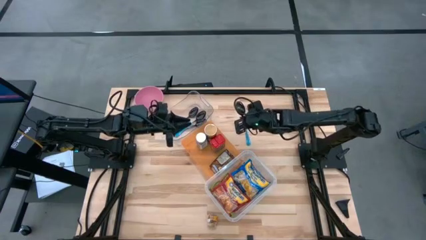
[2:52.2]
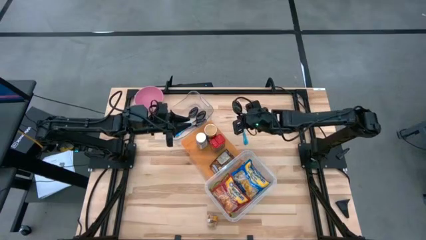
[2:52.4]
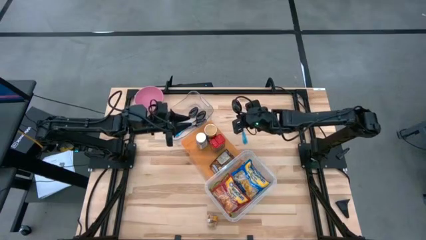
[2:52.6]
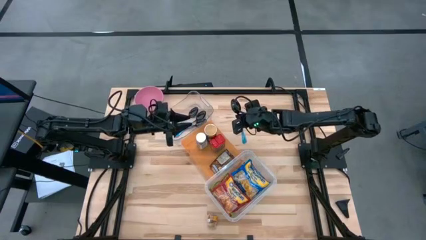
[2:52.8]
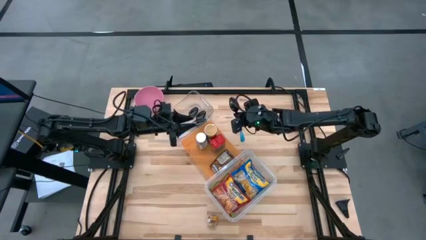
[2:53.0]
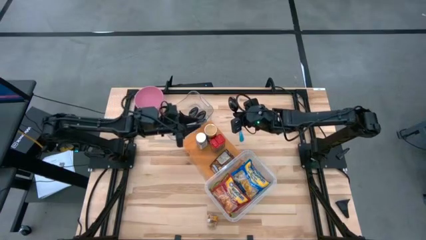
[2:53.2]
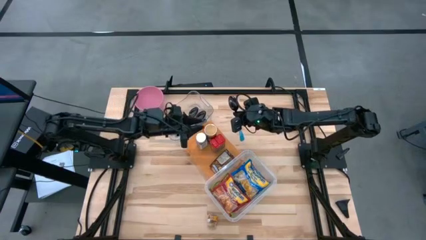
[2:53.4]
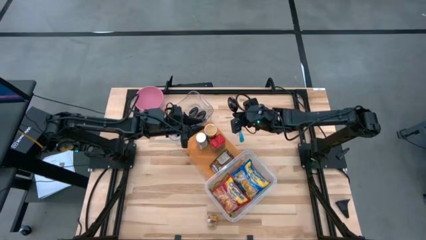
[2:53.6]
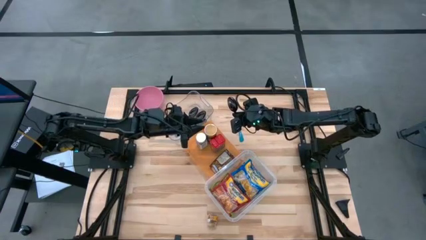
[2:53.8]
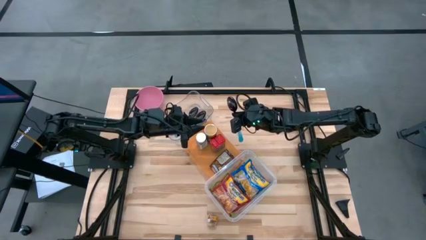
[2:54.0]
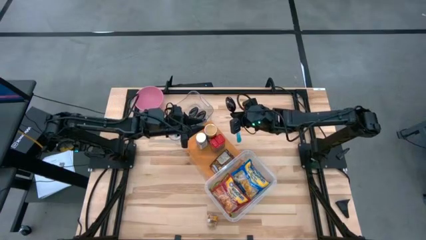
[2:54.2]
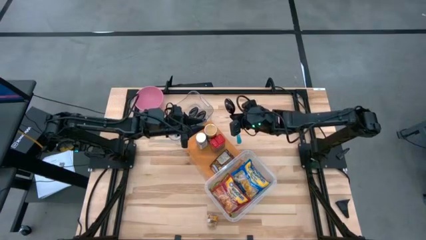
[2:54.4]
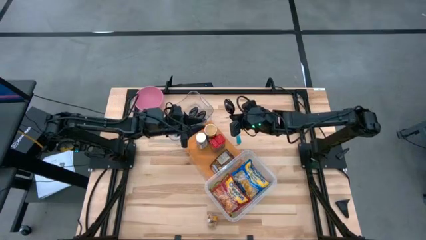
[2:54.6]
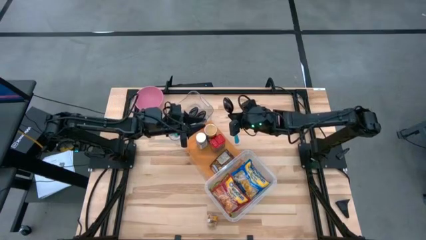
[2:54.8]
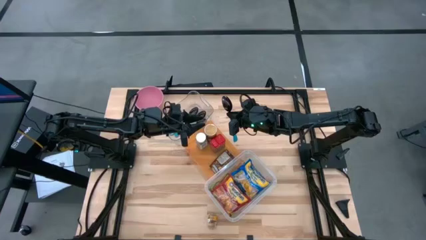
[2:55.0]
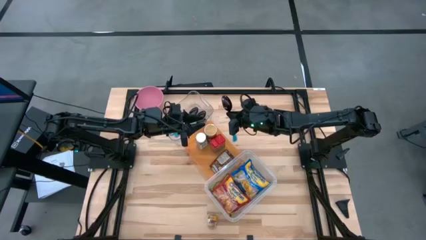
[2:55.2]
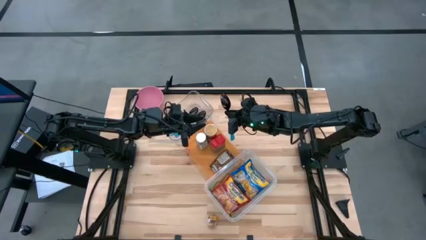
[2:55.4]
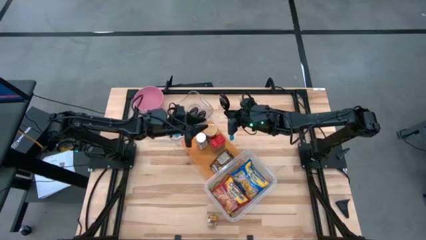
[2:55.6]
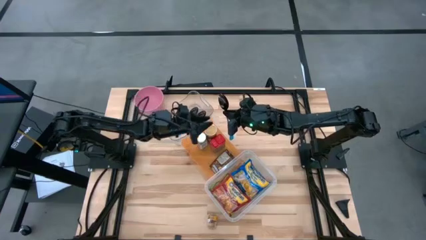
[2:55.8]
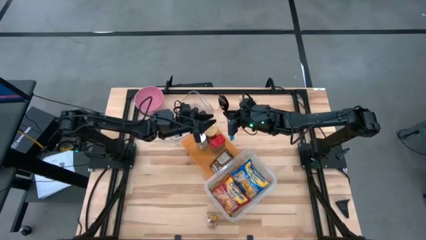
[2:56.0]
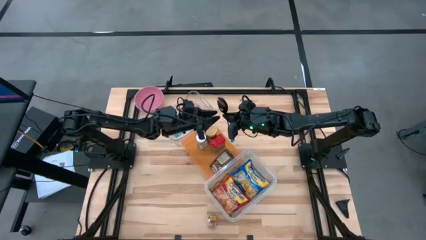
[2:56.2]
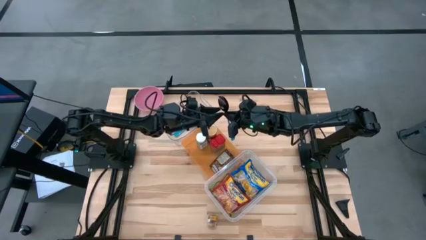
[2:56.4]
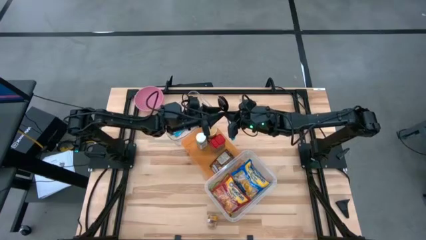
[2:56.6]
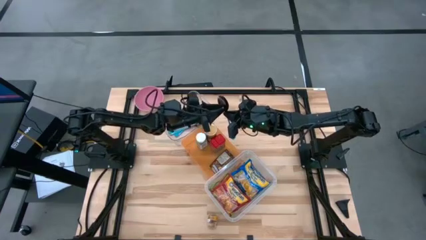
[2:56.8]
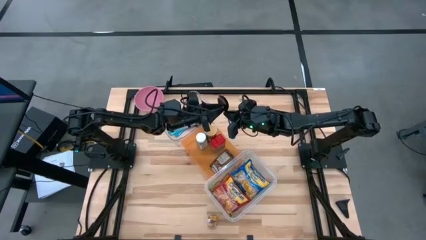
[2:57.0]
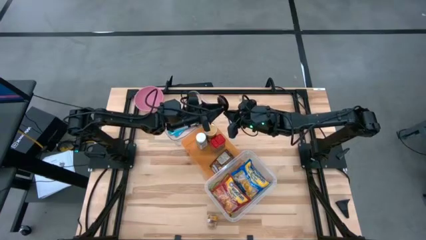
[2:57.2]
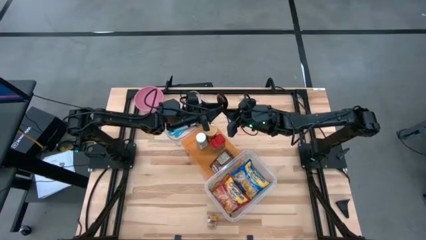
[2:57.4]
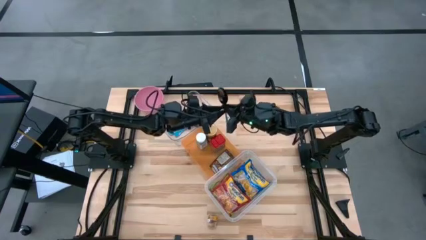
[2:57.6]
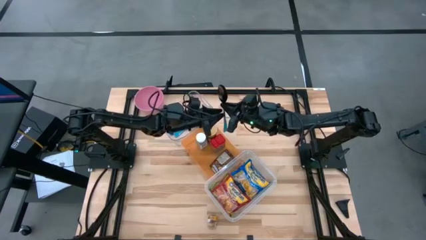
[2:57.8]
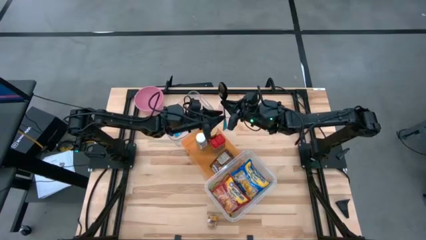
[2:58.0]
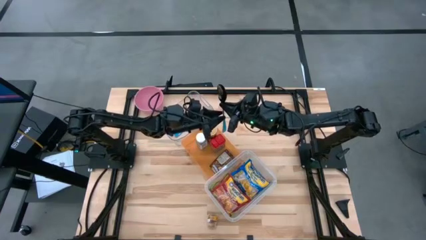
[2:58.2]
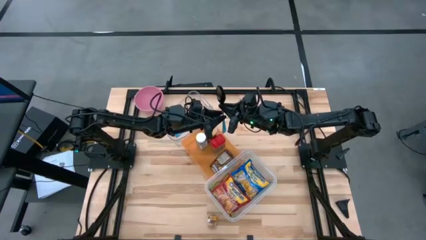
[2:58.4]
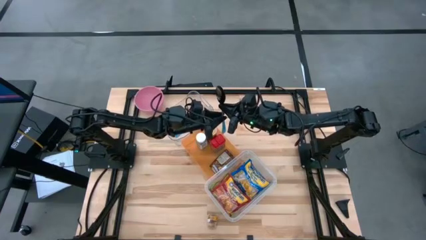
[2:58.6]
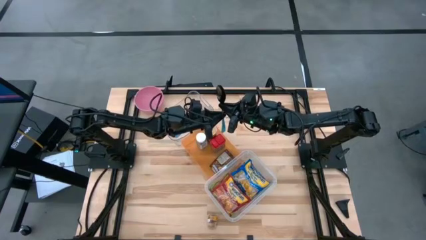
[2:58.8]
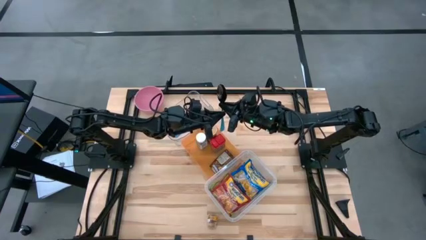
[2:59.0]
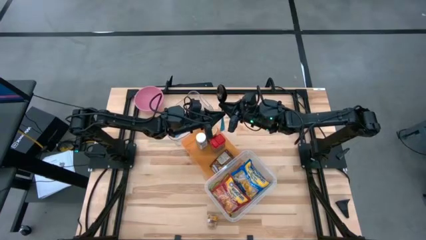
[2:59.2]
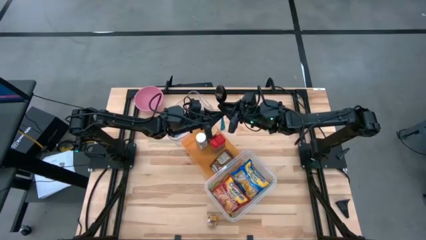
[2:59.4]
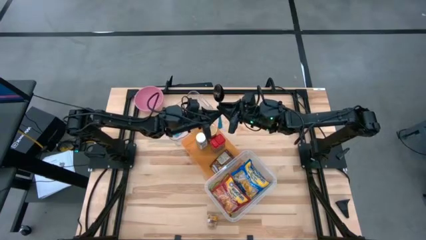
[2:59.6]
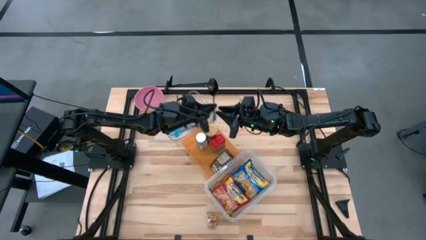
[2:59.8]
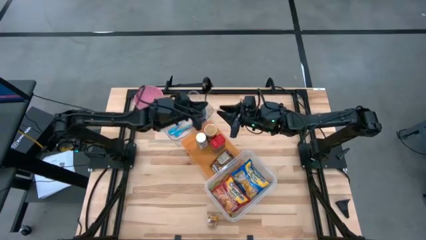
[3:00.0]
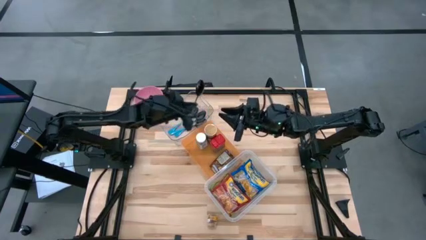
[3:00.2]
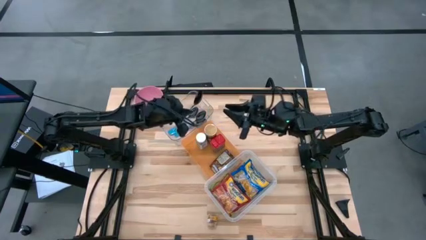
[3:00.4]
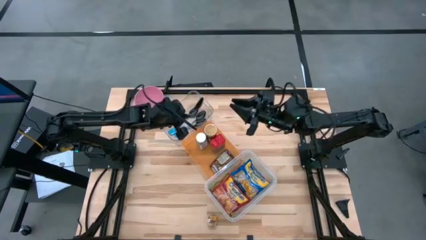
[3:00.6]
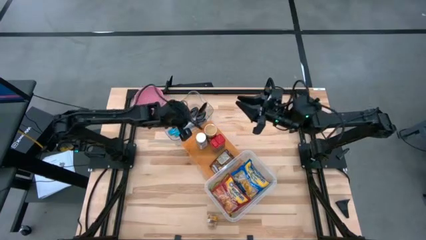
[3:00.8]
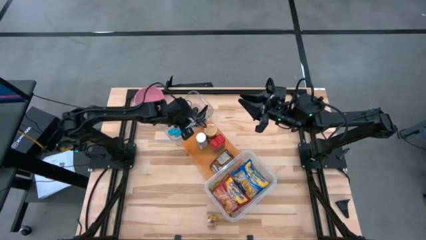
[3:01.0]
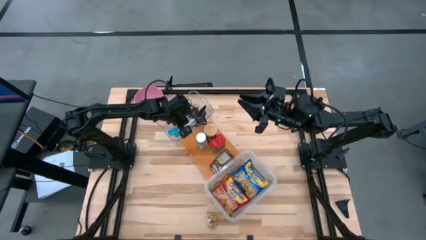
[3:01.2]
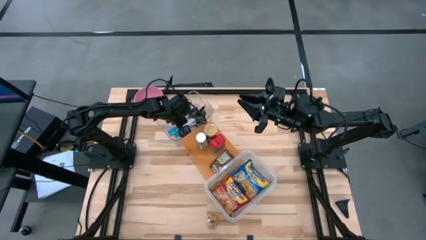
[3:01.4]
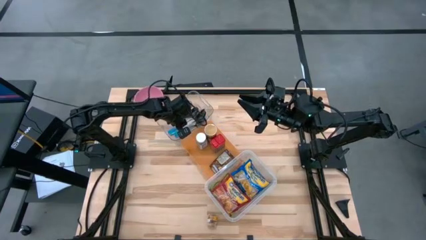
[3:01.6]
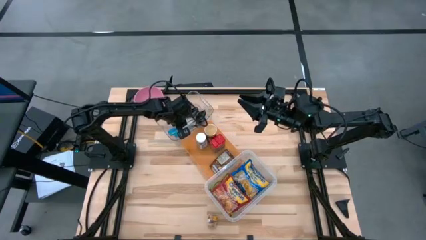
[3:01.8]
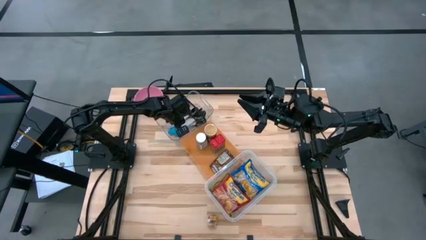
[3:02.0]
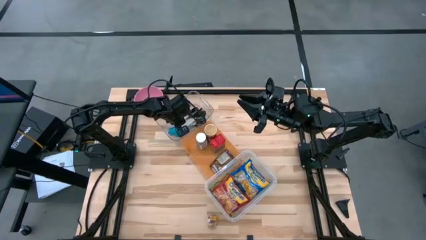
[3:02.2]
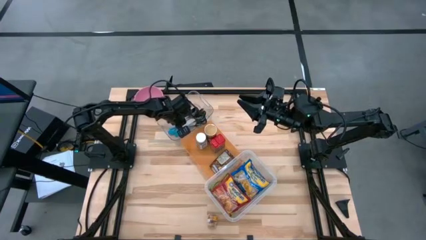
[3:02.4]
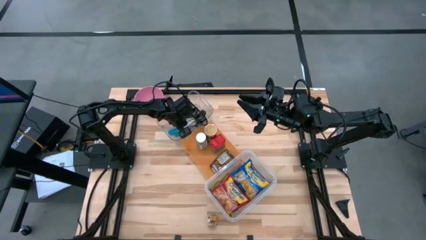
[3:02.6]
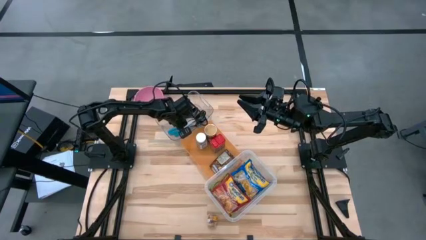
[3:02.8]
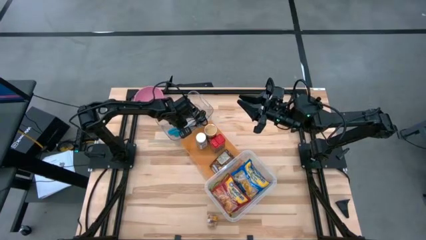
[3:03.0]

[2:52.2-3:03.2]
Task: Pick & Place Food Item
Put the blue spoon in the top transparent bin

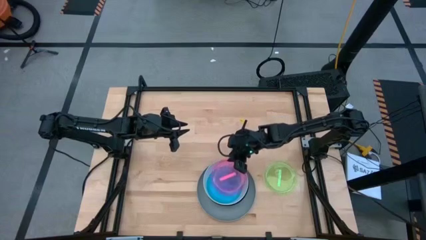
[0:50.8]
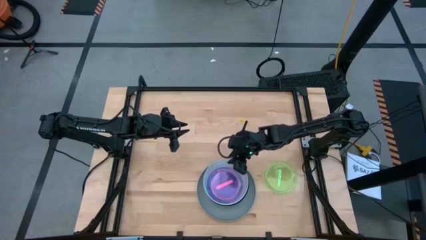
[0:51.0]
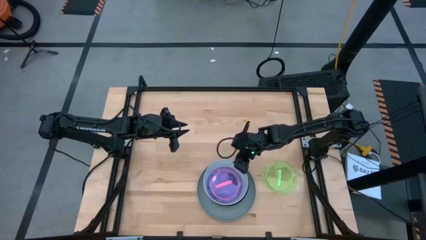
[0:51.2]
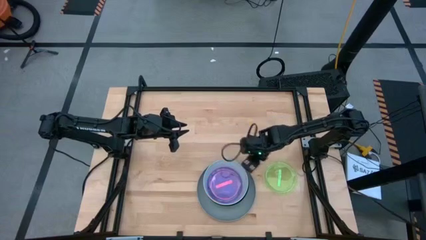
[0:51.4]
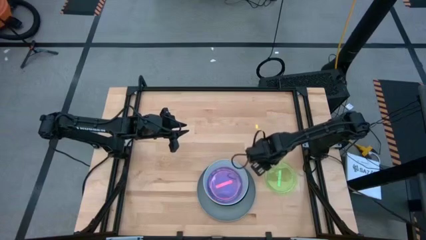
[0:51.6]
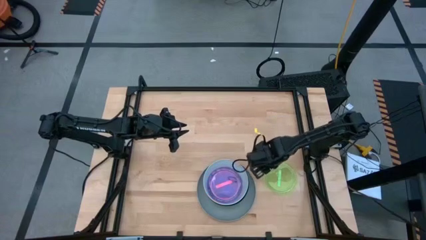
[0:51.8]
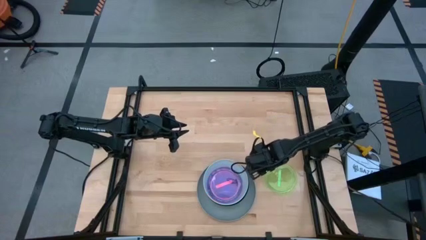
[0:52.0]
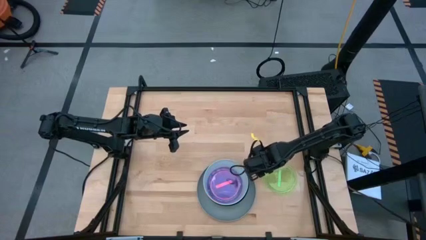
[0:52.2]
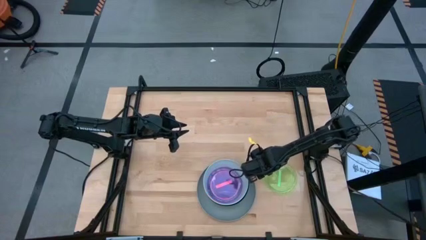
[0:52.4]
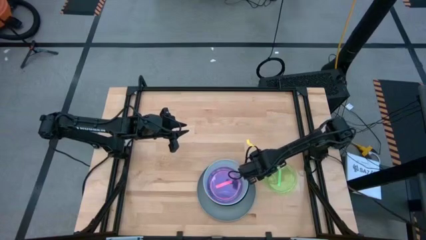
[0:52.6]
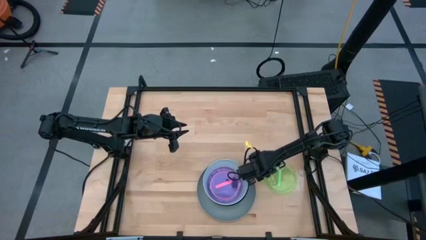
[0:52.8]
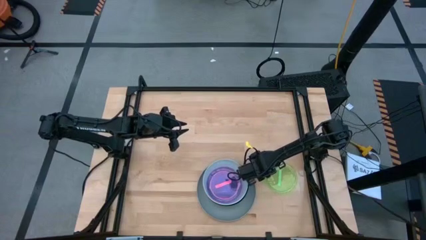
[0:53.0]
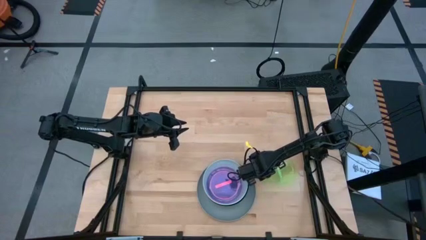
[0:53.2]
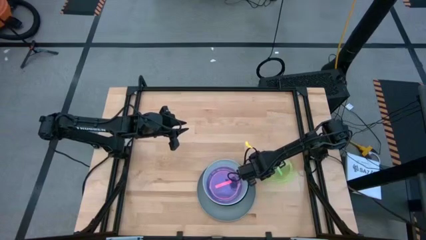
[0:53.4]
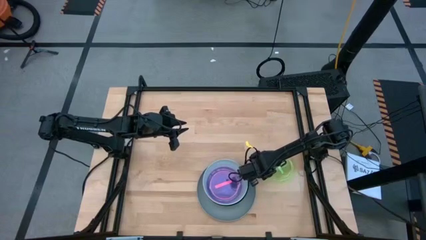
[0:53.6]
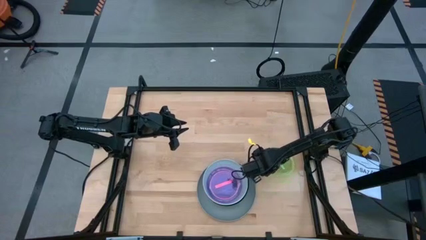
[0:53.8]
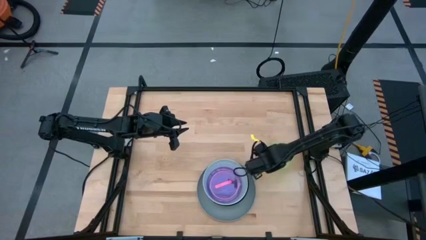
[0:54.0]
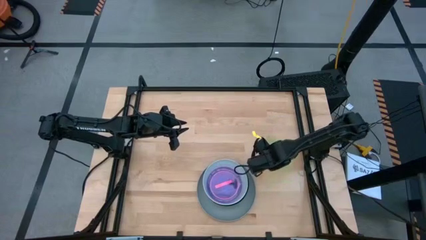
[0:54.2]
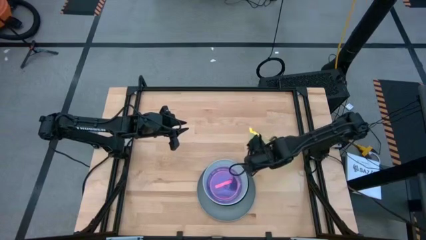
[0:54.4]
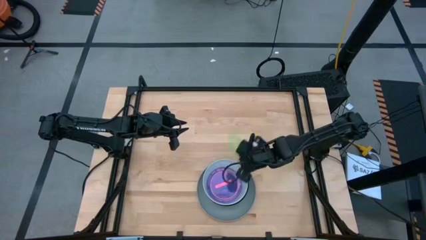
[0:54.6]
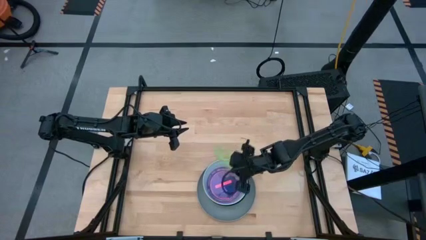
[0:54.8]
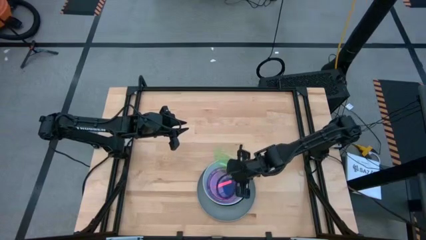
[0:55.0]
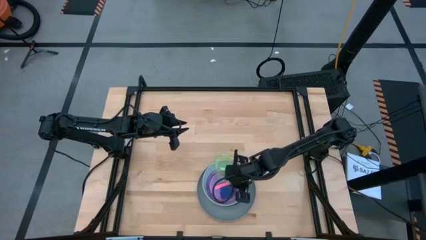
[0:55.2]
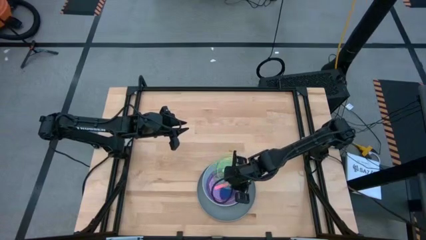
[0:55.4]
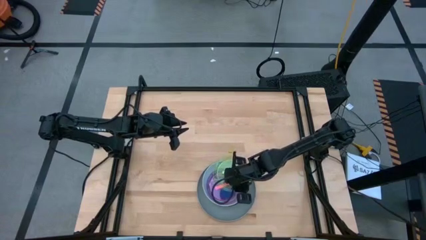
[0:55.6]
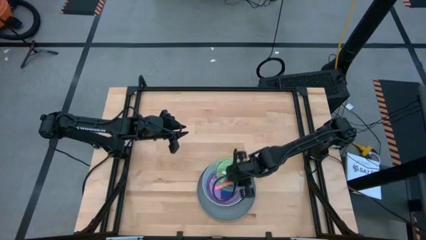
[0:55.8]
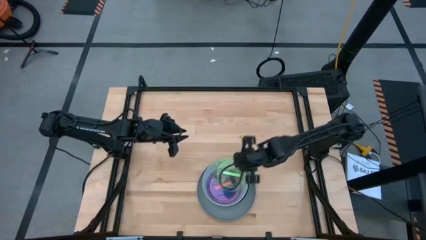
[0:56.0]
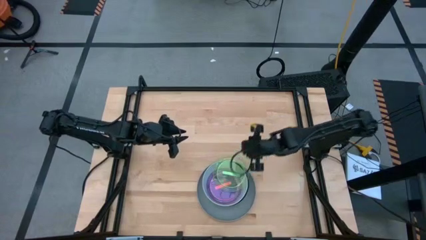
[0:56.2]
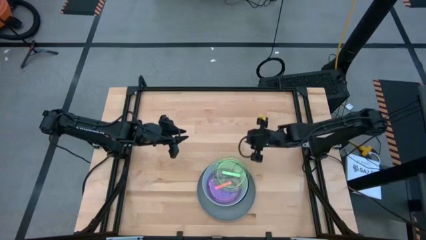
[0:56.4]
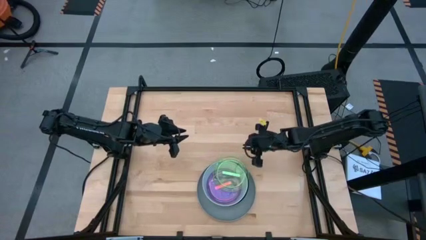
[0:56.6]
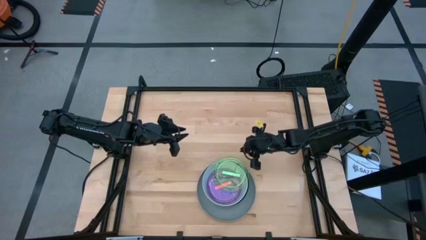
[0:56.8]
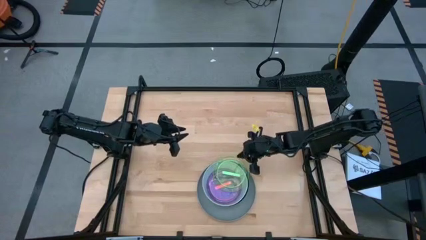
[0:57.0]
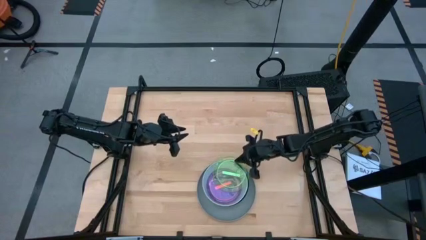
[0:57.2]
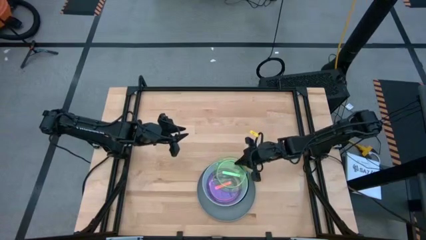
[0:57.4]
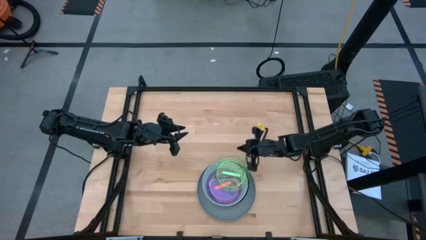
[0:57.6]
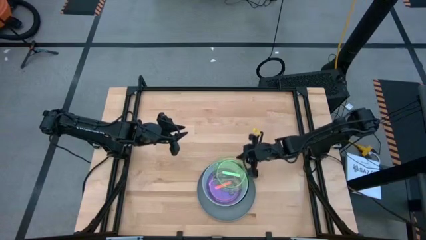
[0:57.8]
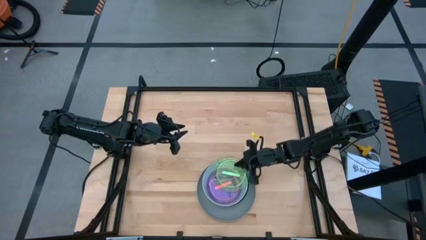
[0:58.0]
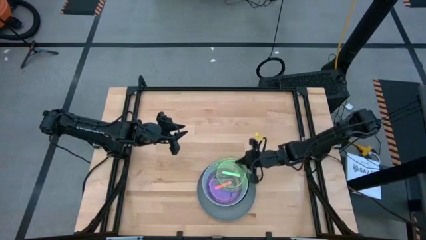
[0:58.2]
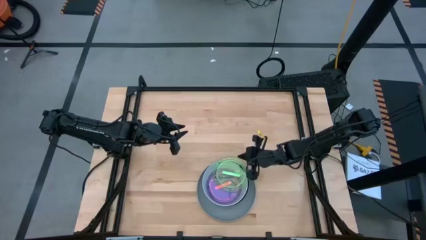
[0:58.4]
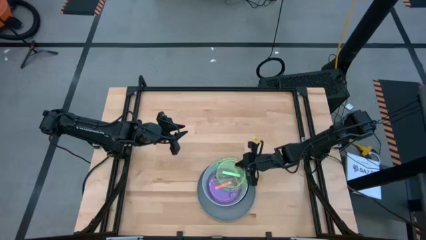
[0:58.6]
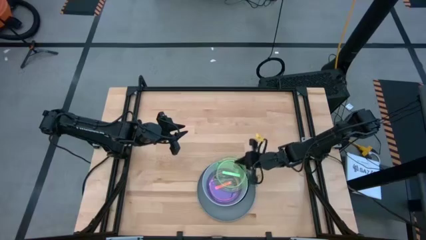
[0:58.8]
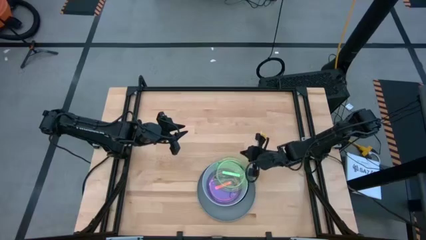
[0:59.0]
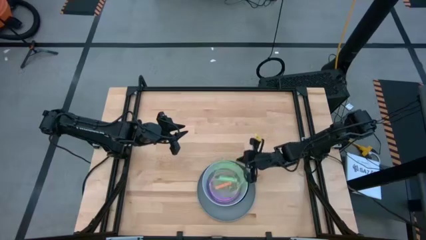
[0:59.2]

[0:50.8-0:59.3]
Task: Stack plastic plates
Stack the green plate on top of the pink plate
